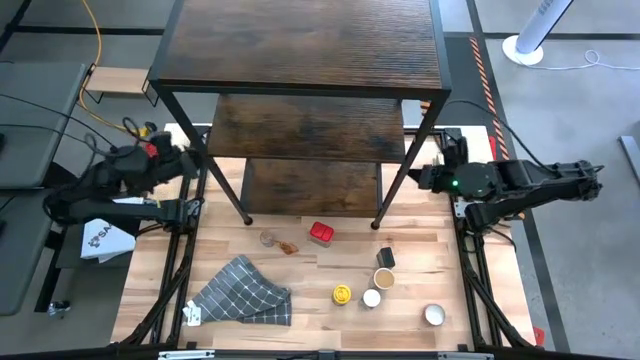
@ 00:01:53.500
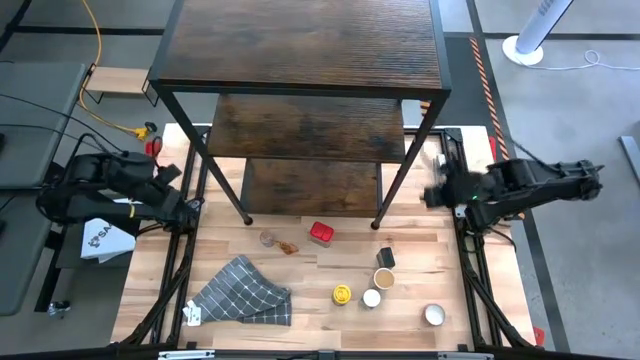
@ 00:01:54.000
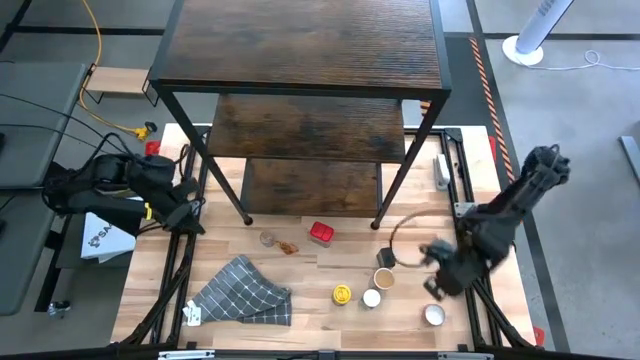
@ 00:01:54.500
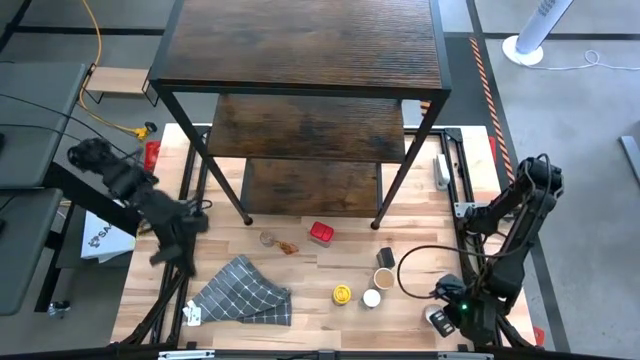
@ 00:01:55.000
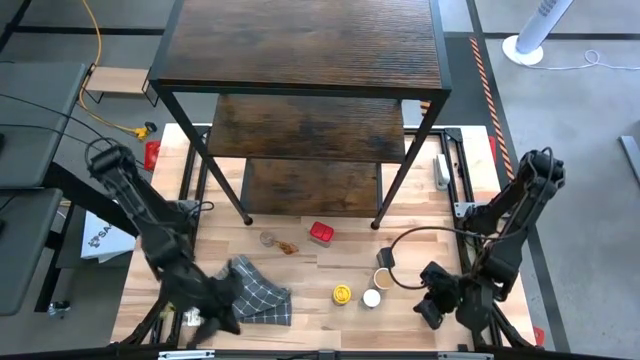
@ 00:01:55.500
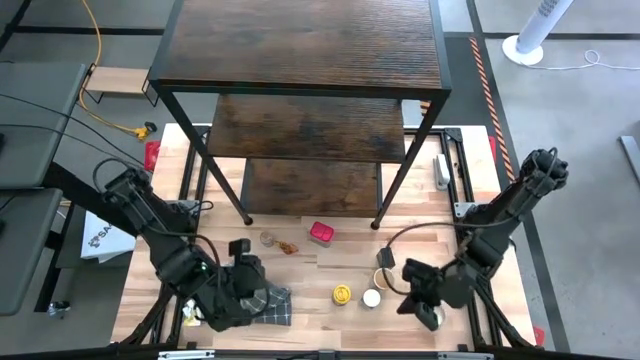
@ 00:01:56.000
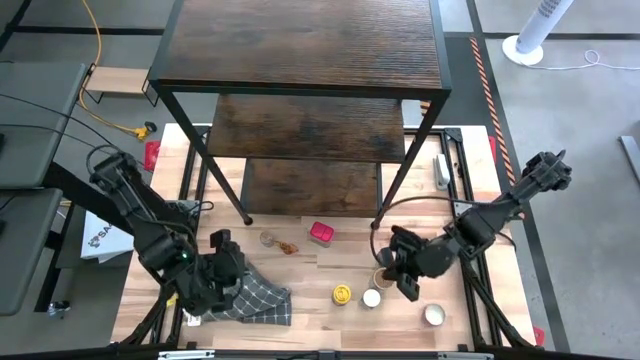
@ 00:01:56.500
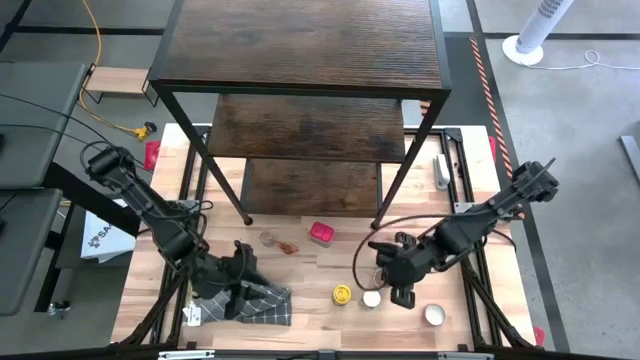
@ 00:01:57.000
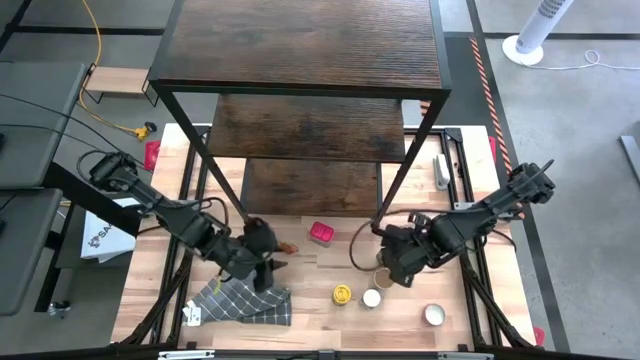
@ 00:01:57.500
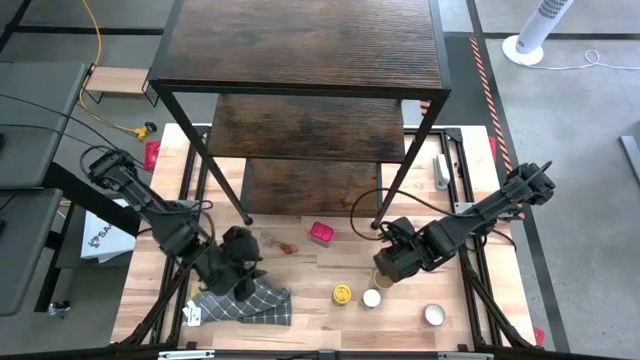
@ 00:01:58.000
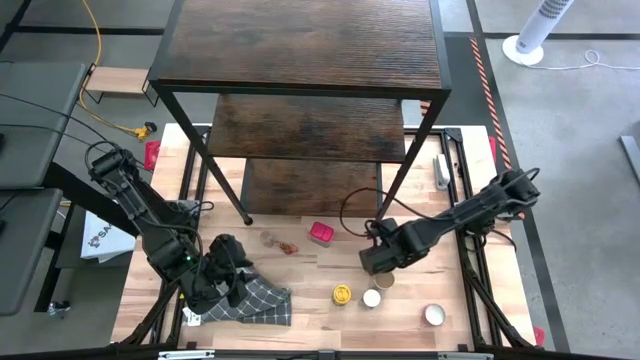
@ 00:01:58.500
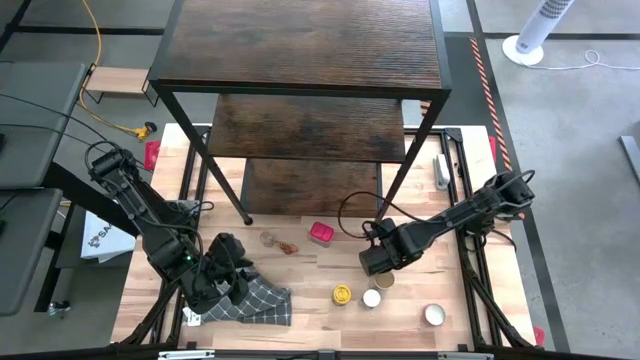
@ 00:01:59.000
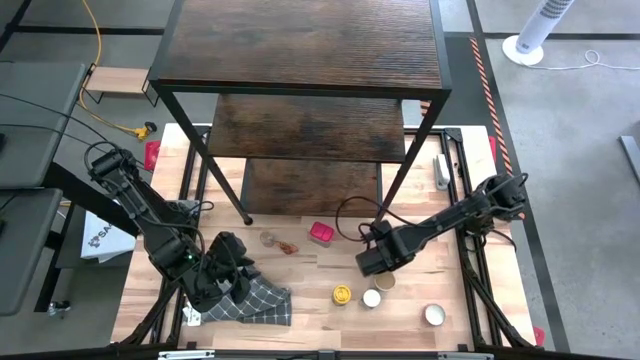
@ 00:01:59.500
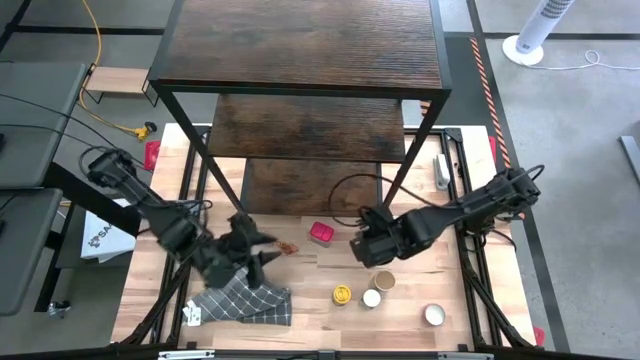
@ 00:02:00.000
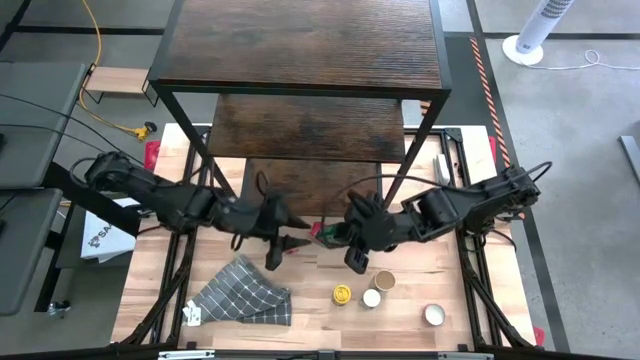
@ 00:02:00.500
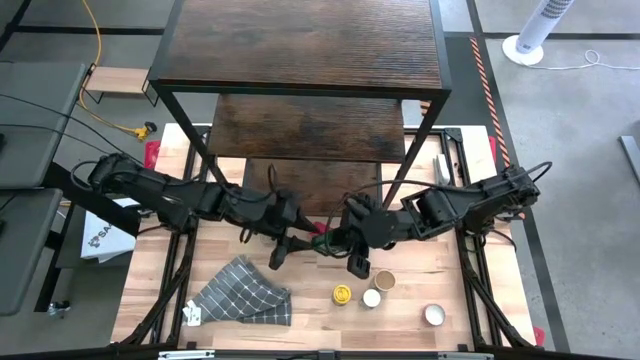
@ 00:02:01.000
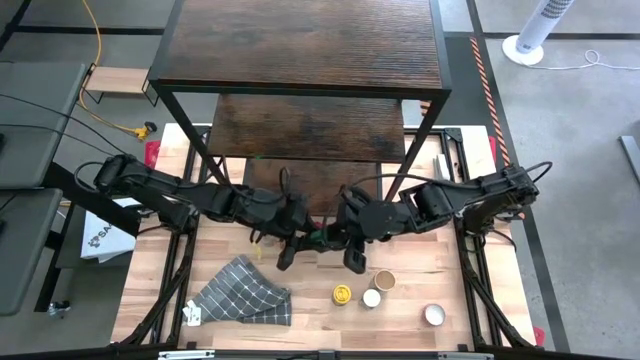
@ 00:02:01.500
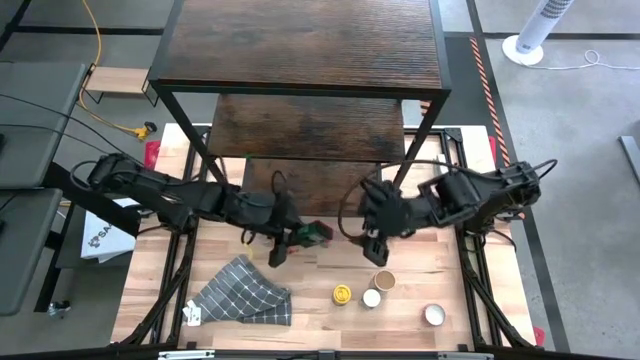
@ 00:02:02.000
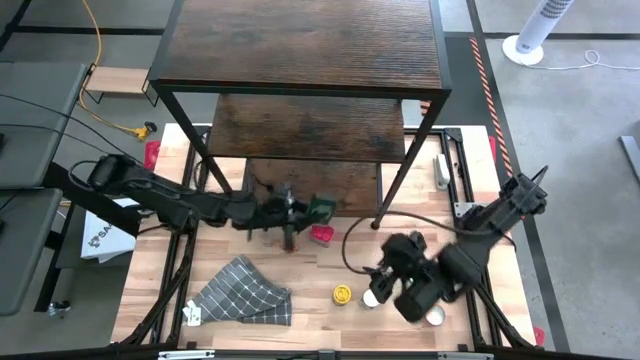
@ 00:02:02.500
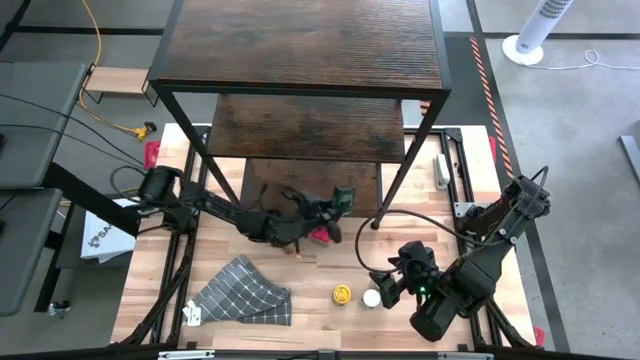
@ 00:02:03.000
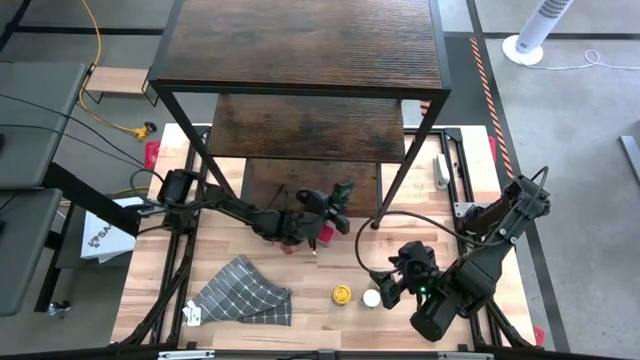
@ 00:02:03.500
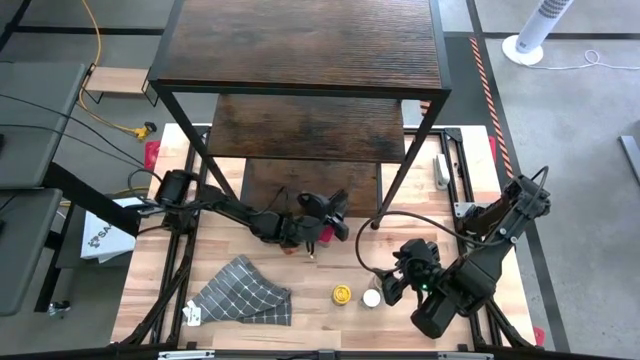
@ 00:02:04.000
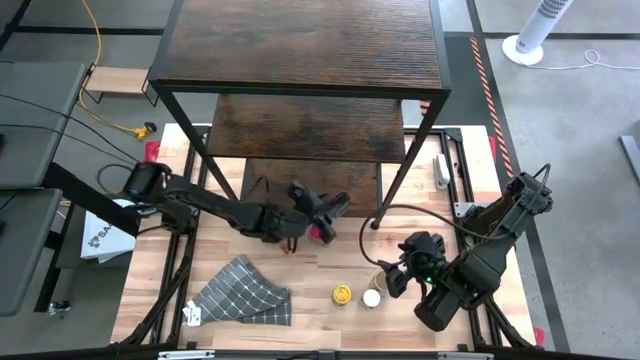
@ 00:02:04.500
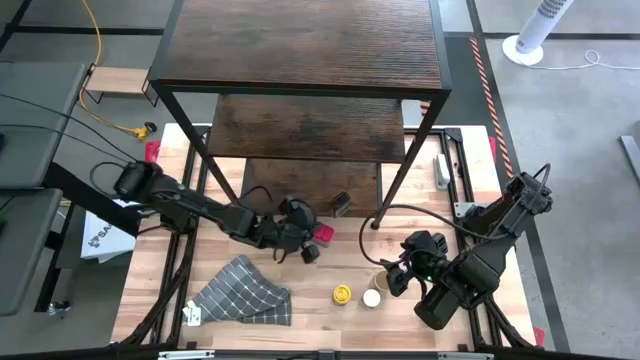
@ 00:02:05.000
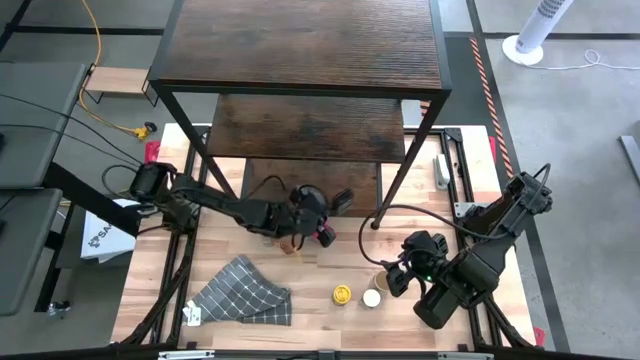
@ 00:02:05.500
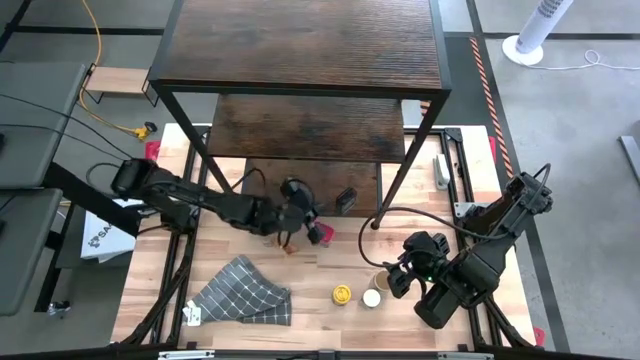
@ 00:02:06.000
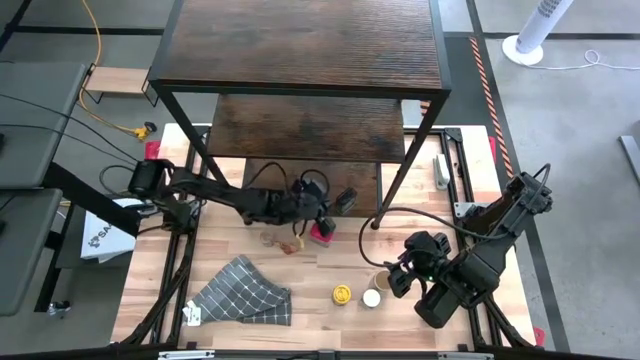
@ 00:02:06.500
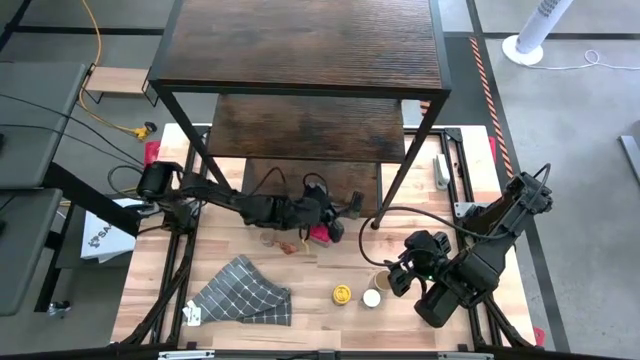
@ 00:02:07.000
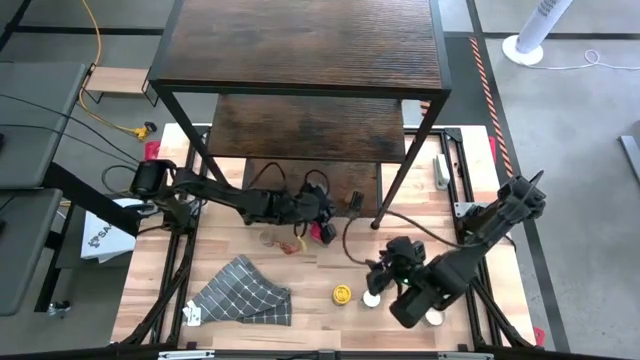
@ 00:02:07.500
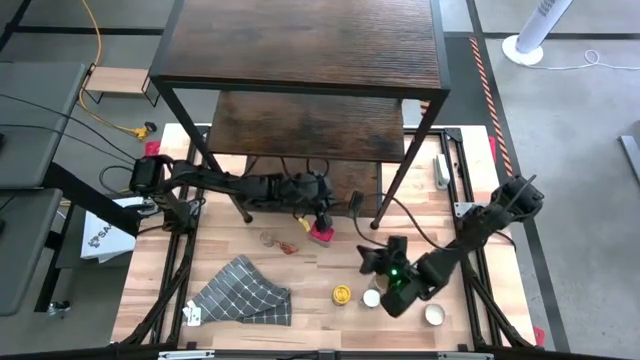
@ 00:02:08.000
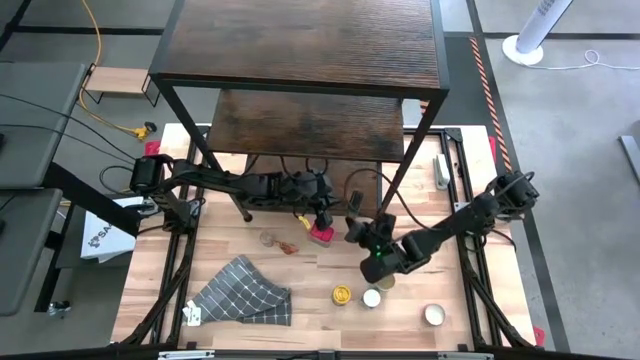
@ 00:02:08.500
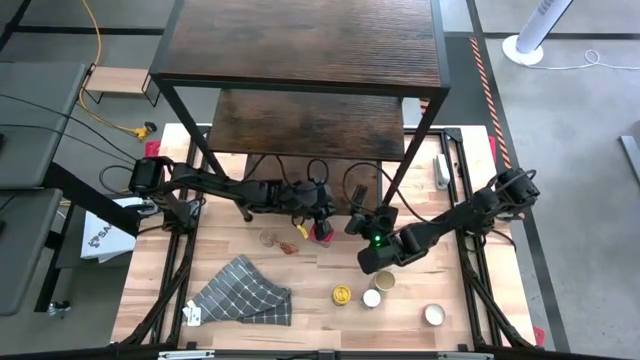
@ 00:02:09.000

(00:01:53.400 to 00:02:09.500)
Task: Shelf spices
Put the black seasoning can on the shelf

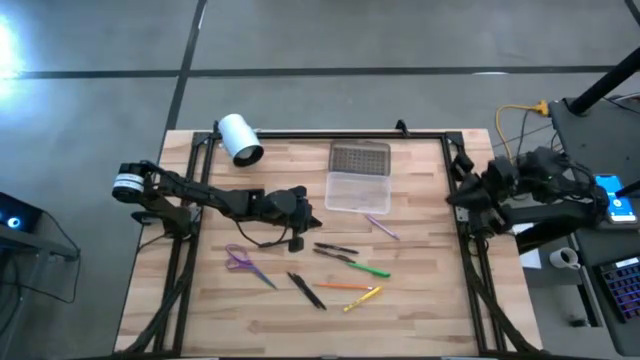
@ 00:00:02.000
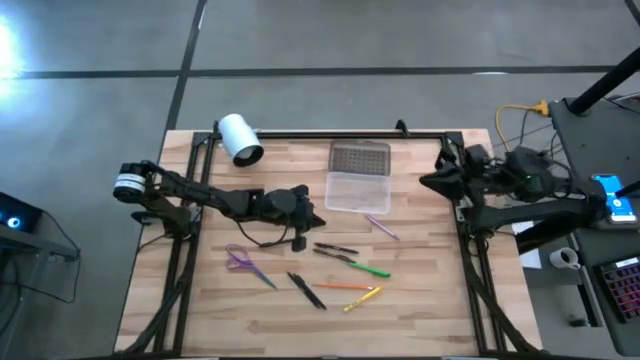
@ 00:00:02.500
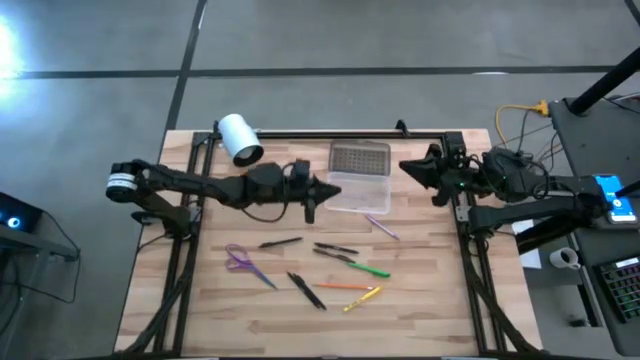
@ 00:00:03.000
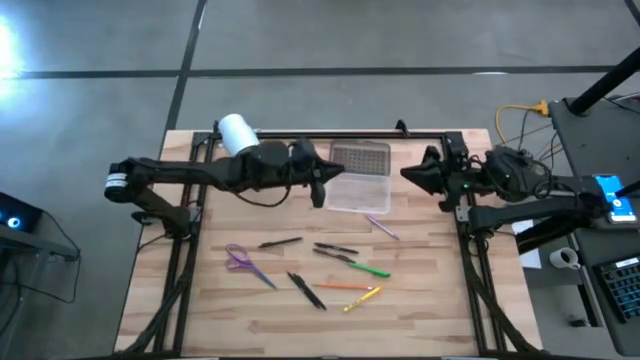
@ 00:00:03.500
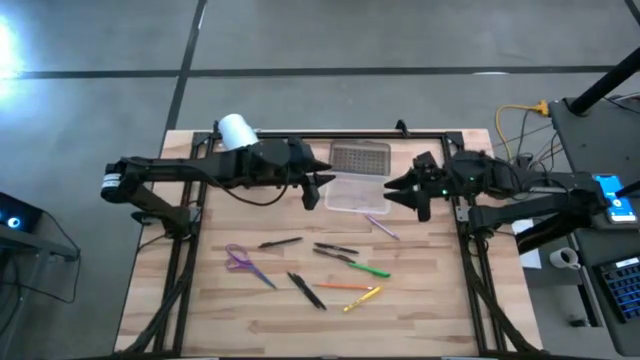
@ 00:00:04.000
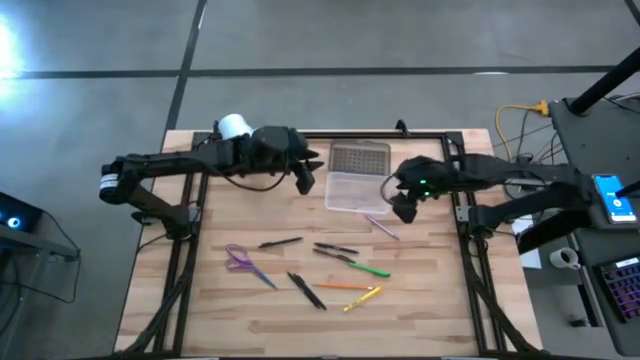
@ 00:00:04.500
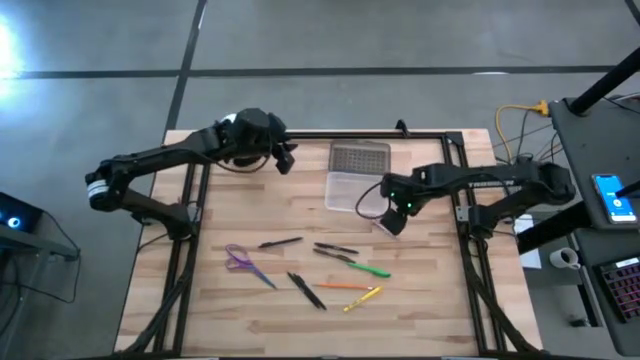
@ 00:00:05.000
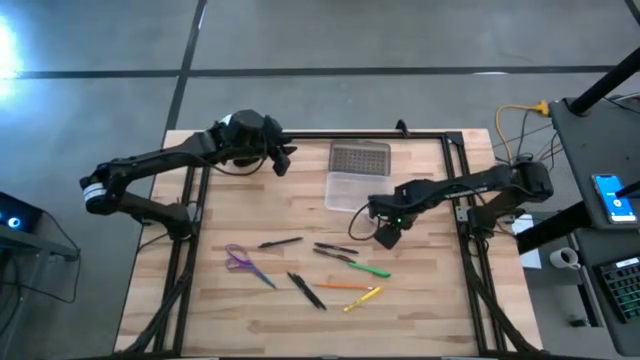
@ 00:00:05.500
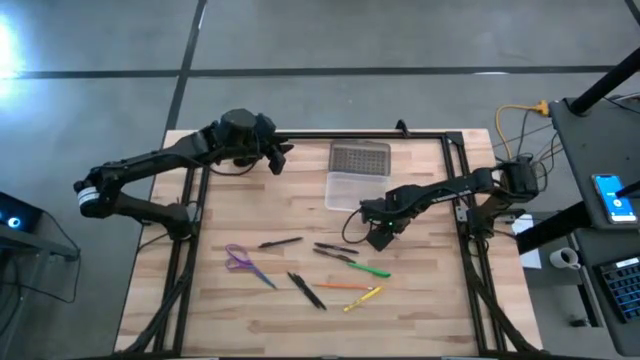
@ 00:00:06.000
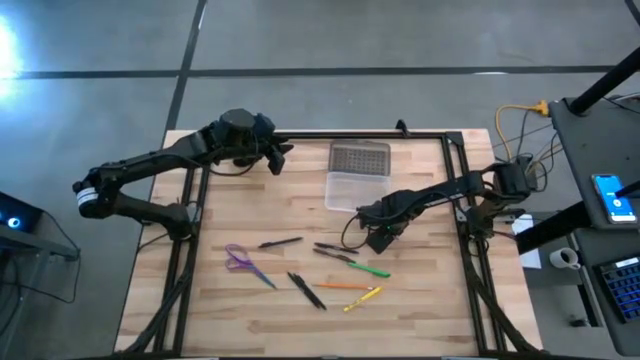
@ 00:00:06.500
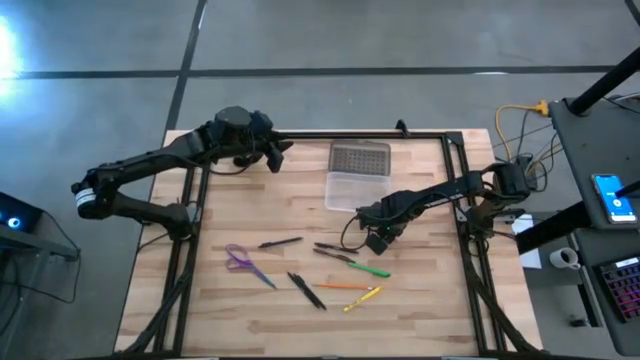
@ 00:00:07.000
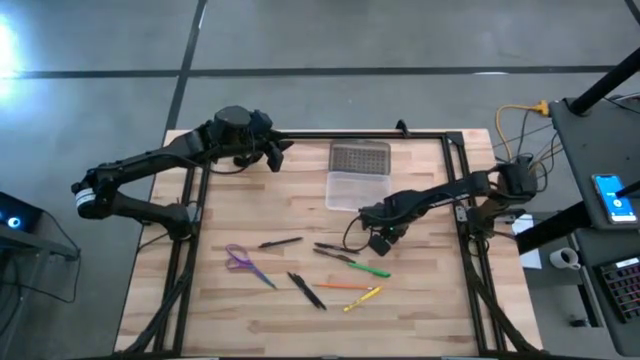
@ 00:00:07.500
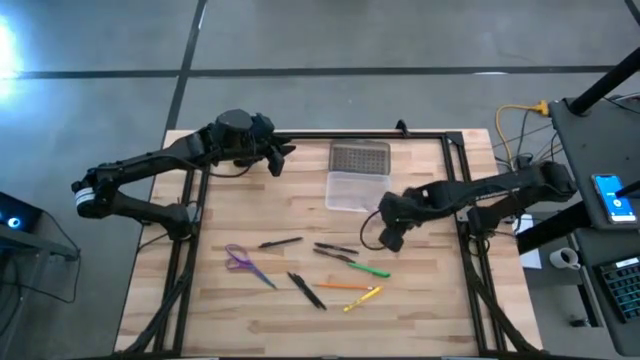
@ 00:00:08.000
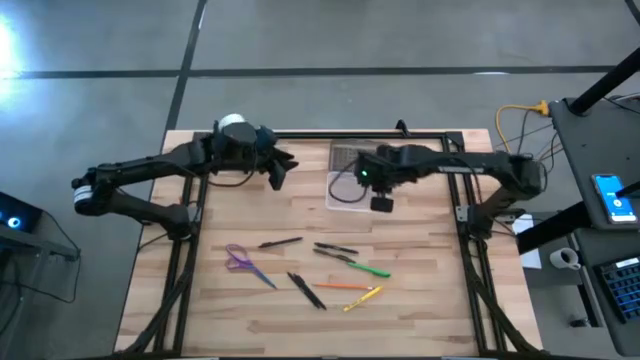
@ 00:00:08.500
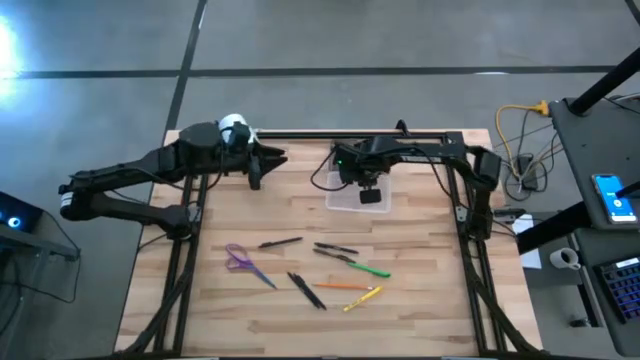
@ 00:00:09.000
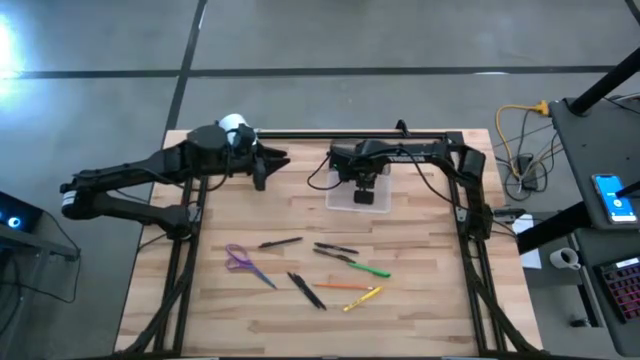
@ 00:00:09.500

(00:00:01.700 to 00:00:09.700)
Task: Pick & place school supplies into a supply box
Put the purple pen into the supply box
